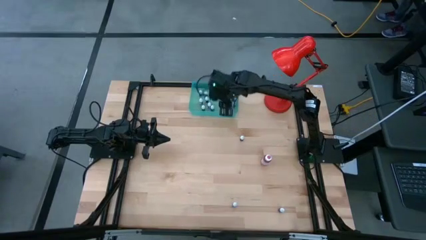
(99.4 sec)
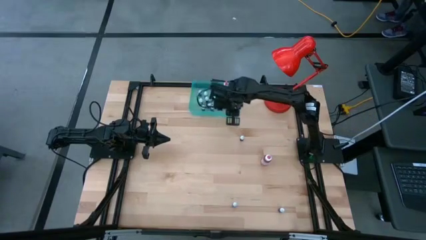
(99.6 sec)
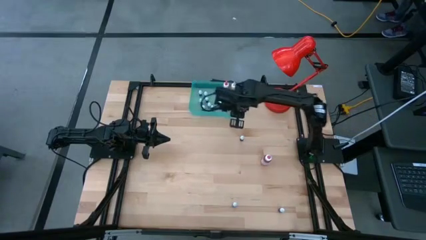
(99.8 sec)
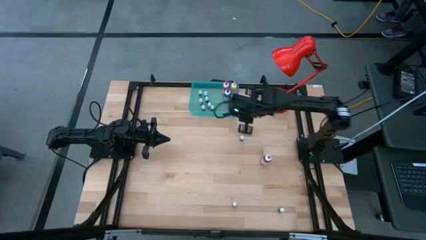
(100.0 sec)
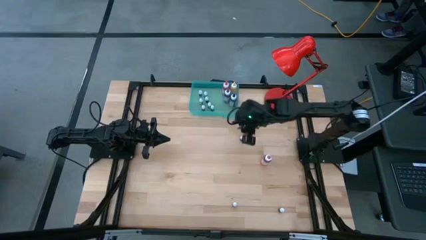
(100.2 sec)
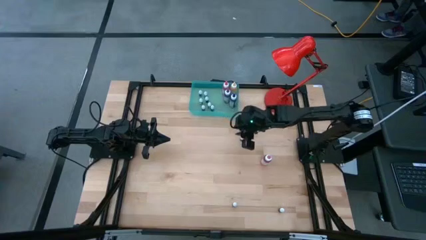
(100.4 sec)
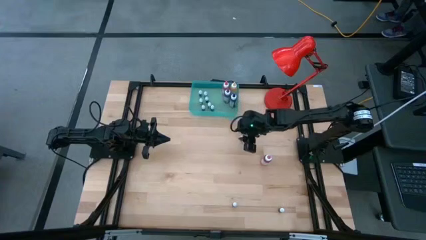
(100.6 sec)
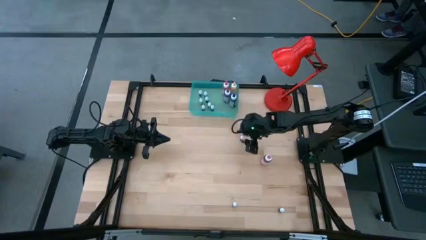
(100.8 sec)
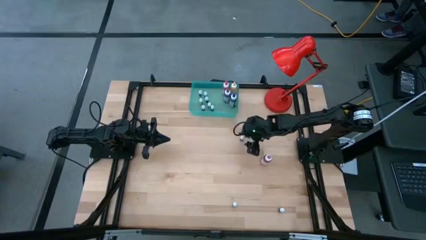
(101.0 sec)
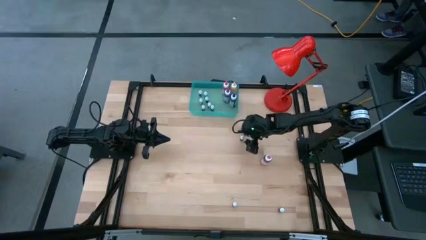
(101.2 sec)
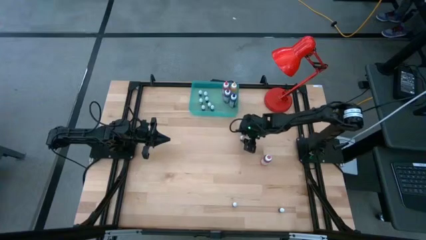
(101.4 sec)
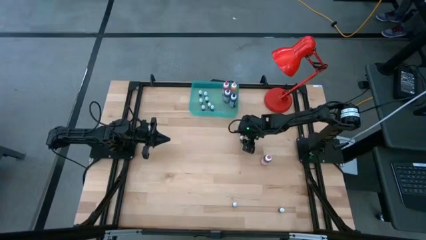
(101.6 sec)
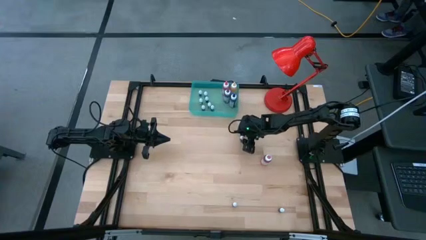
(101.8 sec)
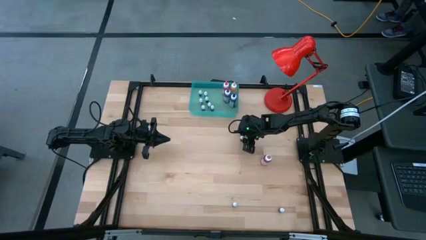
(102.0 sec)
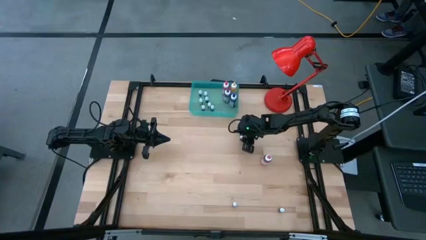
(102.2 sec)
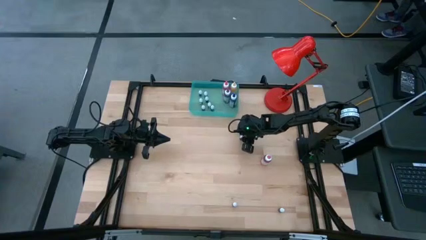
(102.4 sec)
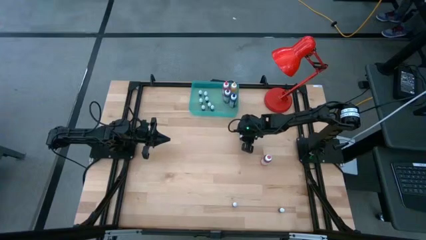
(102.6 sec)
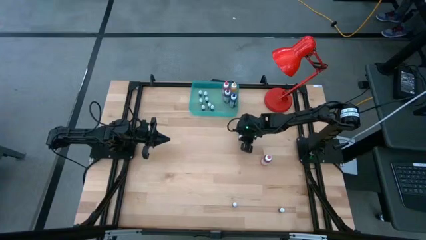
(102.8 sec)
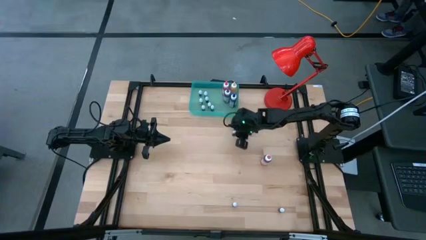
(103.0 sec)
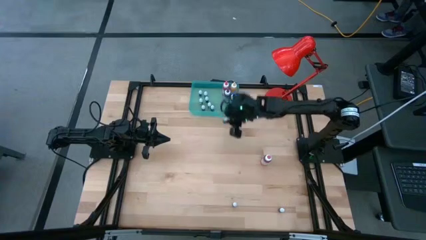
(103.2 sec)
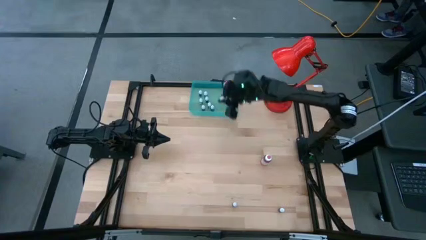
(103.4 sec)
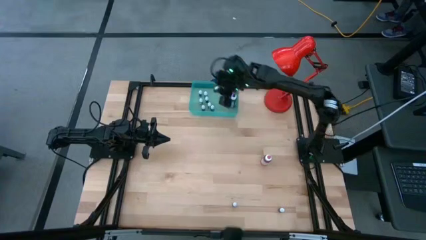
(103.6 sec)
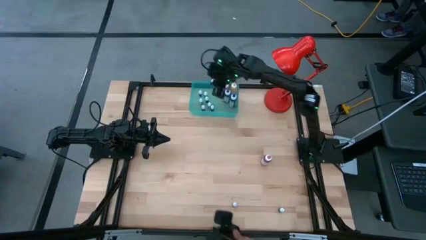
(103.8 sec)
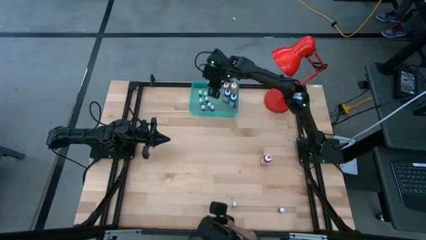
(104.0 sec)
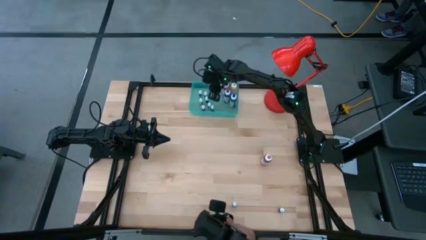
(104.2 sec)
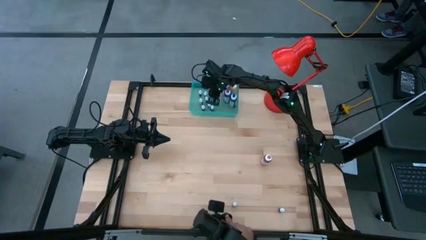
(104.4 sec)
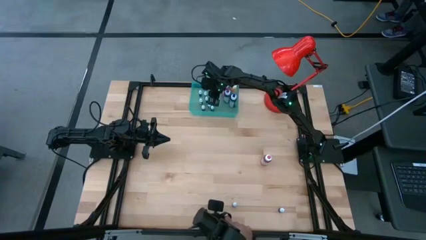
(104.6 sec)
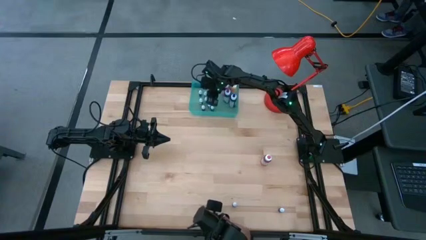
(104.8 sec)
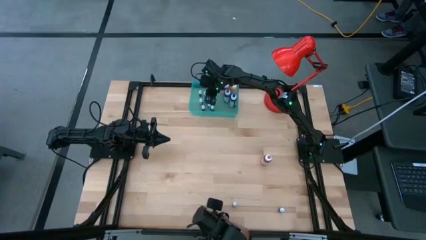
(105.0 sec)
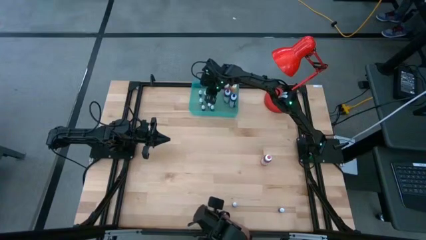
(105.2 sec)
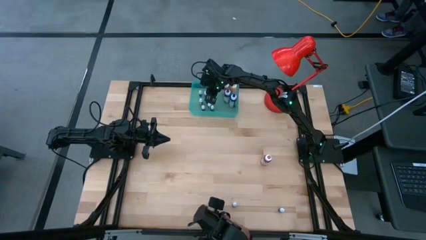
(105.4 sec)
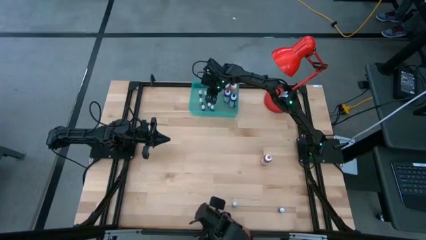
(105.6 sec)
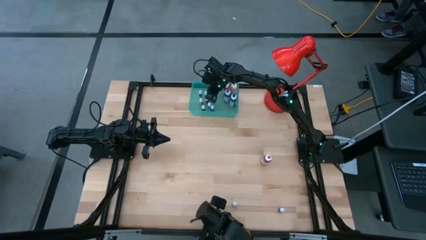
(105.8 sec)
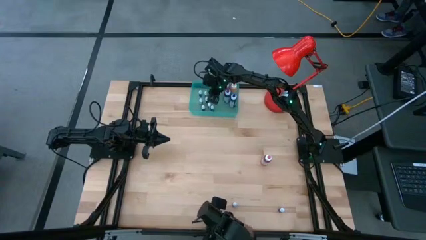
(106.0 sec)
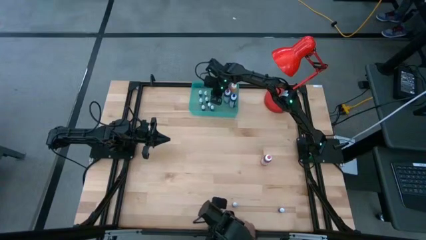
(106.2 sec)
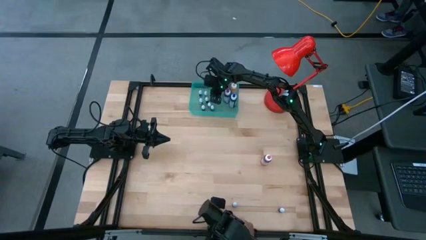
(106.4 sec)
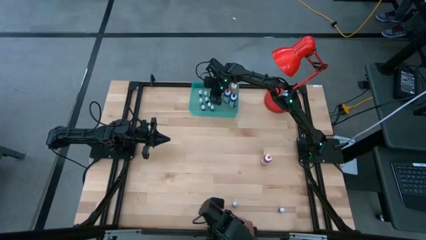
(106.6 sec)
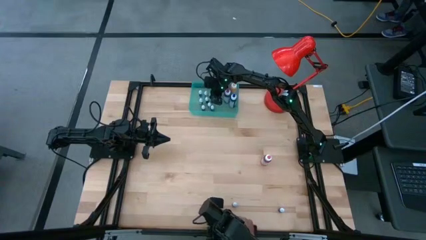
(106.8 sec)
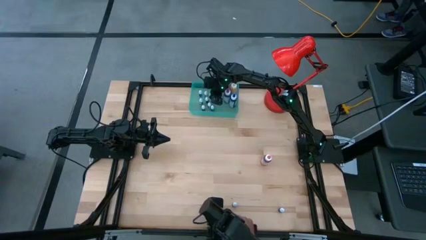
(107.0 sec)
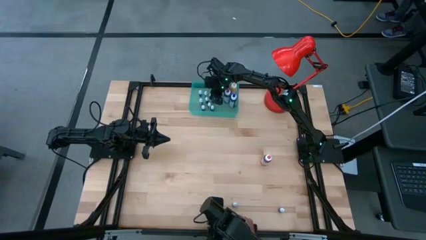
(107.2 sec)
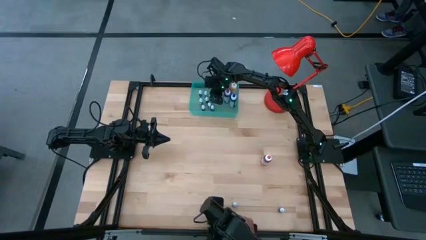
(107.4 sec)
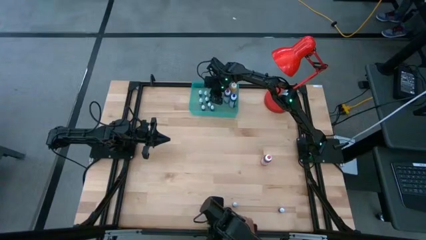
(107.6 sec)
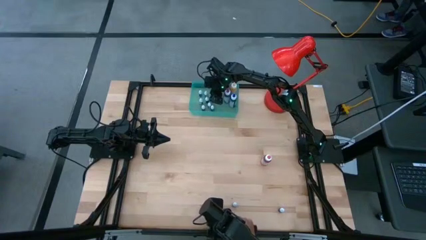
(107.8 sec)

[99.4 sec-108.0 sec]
Task: Pick & Place food coloring
Put the top black food coloring bottle into the bin

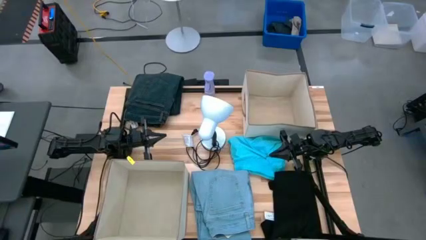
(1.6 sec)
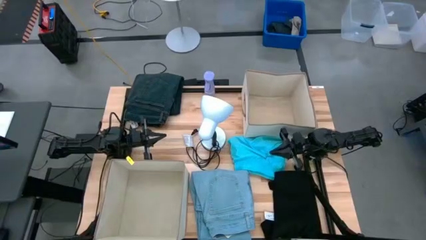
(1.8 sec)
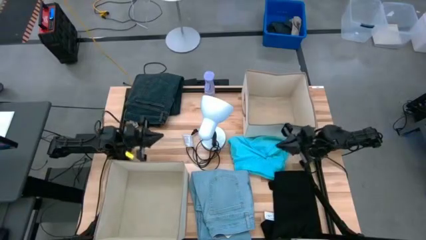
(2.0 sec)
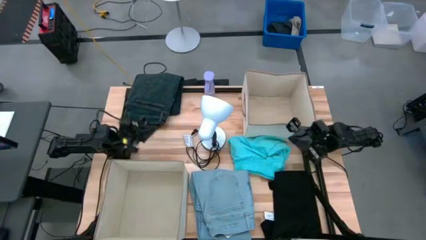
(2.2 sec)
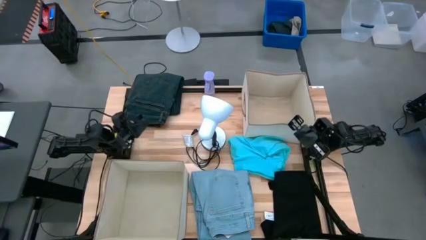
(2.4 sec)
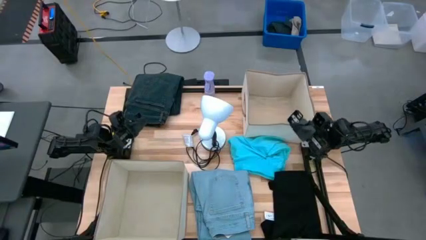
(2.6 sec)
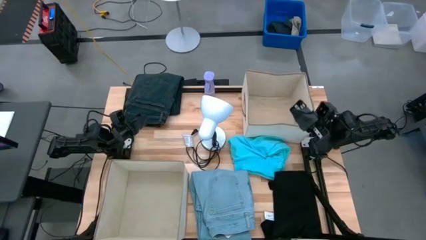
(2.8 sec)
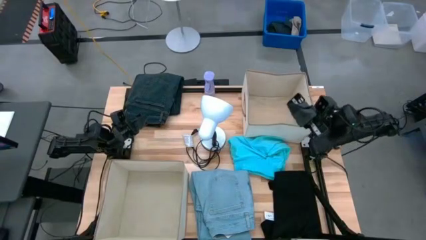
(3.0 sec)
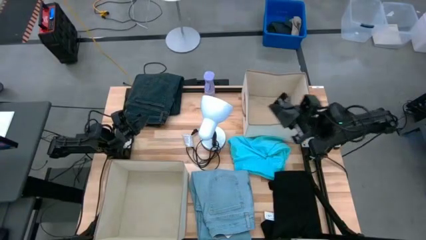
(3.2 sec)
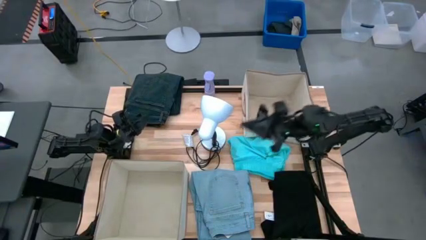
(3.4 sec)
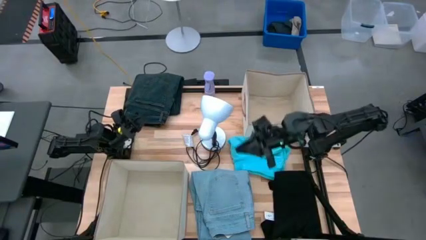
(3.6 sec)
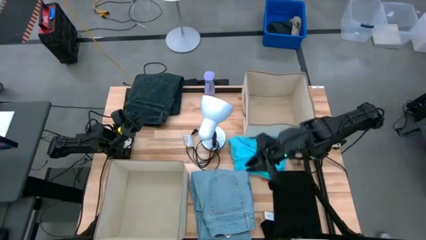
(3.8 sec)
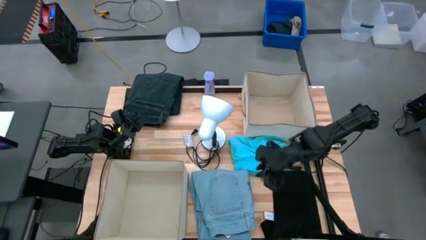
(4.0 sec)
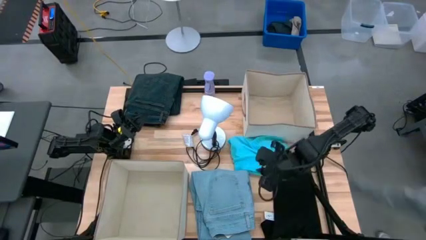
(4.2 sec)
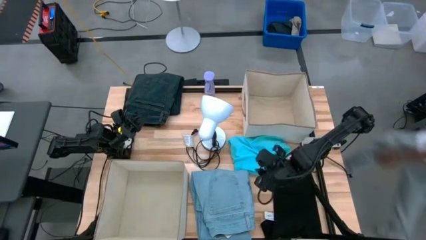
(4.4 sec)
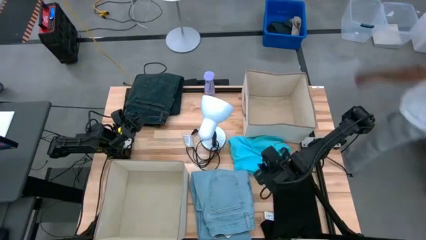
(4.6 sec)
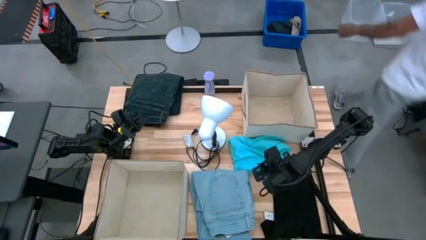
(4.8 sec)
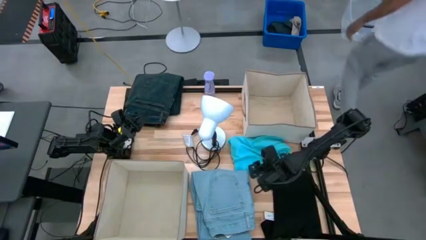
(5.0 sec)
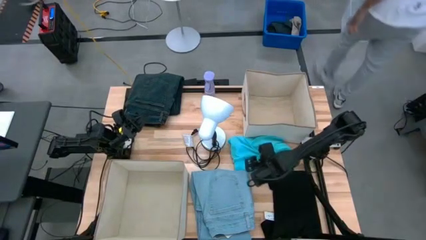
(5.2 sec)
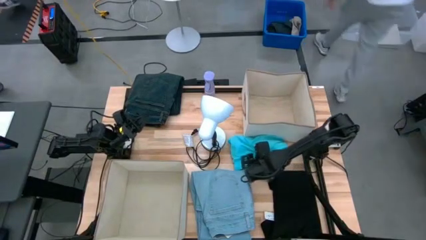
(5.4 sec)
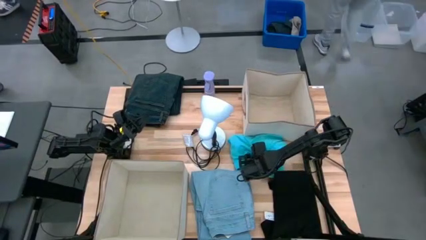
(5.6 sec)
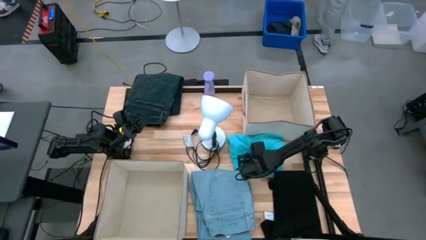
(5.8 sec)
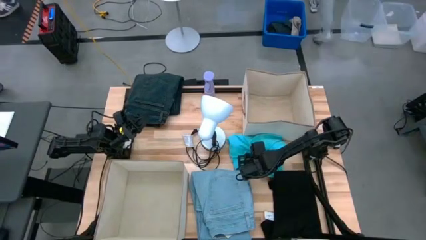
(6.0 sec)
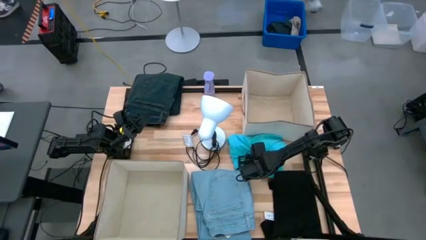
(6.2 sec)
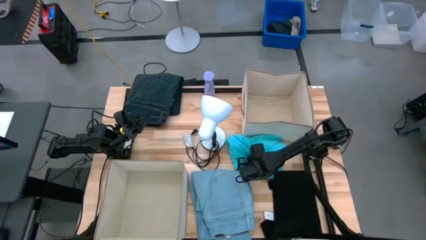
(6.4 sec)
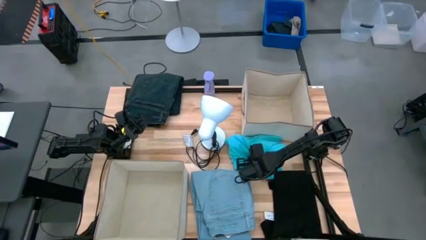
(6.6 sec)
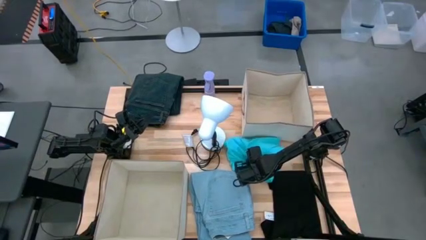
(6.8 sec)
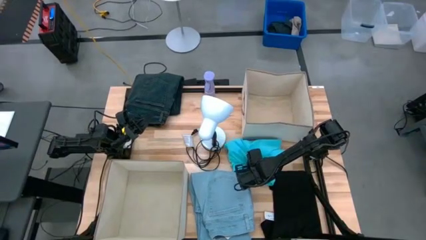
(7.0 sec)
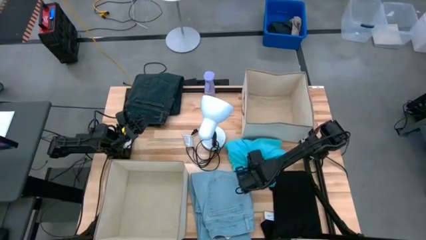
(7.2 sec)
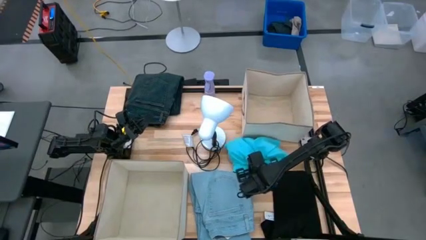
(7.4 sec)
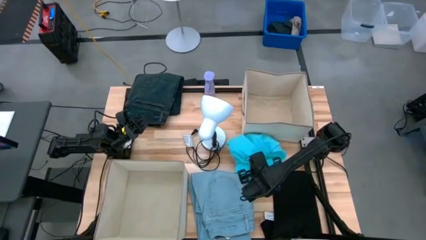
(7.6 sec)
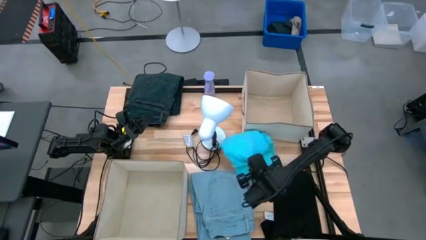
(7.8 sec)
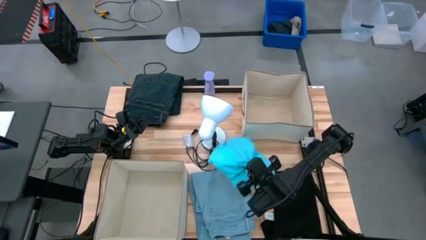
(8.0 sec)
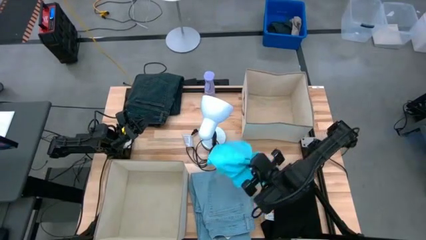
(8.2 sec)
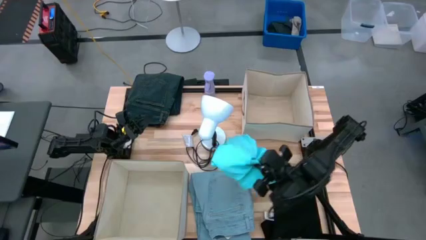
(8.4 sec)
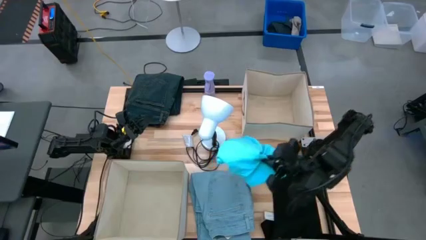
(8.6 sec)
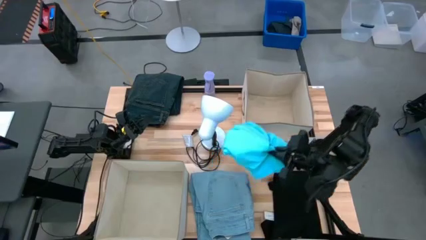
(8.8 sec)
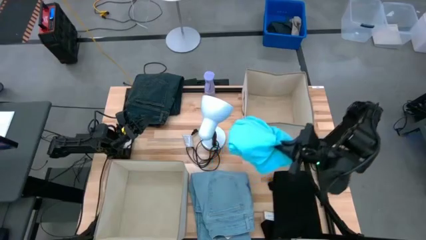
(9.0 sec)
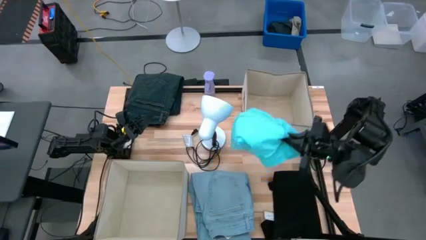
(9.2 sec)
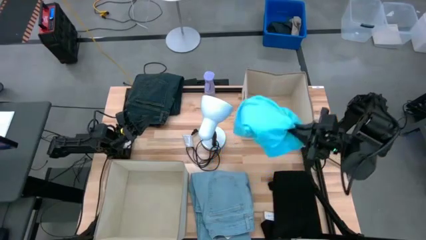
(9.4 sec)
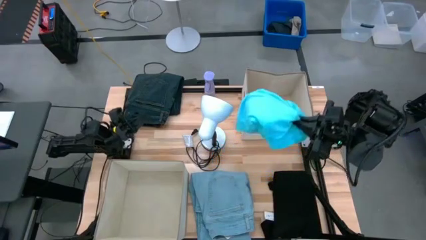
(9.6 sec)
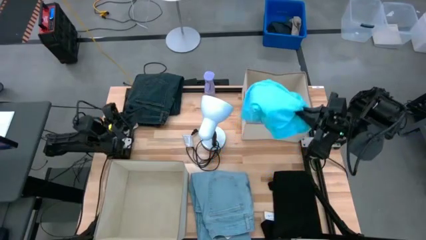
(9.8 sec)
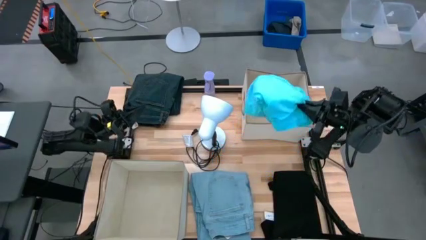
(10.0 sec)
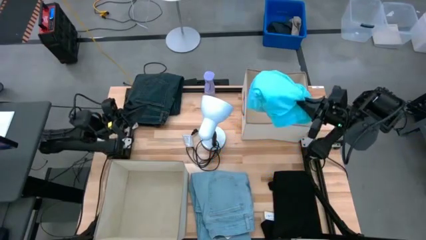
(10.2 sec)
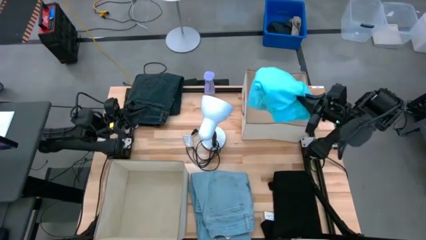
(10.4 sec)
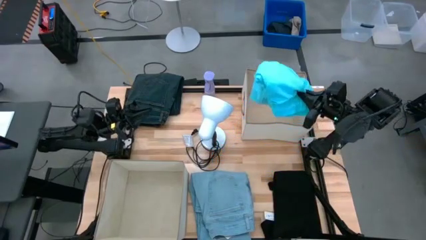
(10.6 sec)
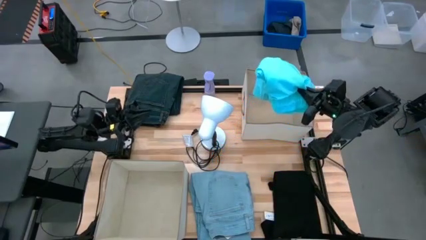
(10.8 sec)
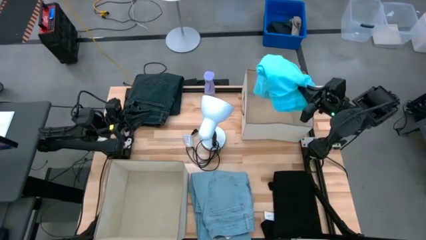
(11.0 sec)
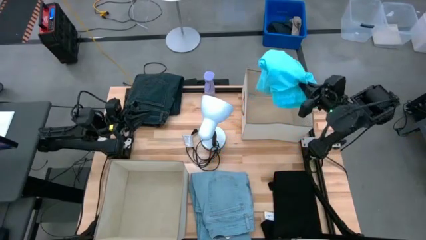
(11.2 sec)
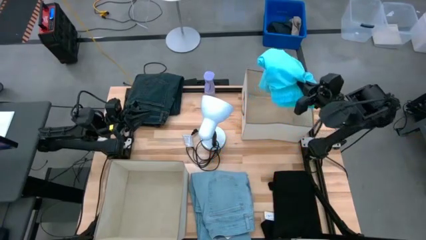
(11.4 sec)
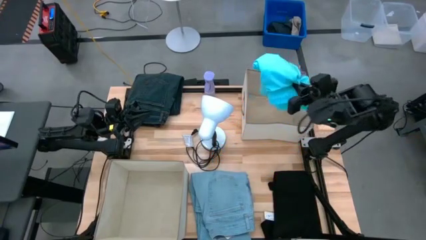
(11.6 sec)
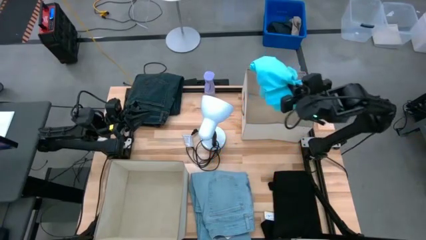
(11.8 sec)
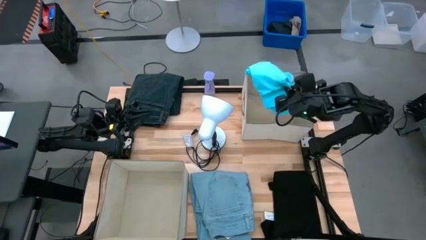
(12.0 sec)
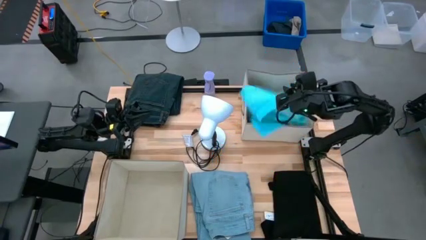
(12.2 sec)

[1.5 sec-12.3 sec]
Task: Sort clothes
Put the light blue shorts into the top laundry organizer
